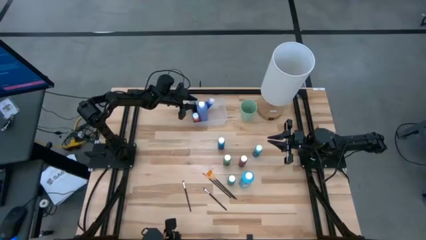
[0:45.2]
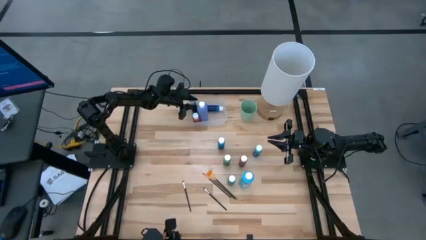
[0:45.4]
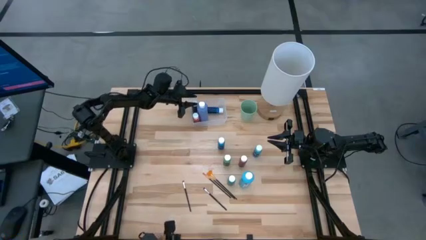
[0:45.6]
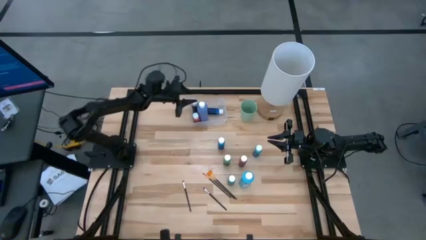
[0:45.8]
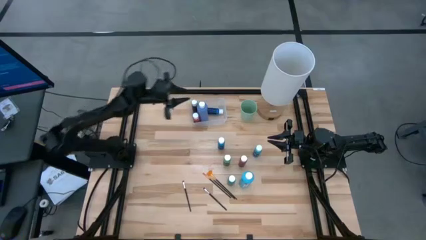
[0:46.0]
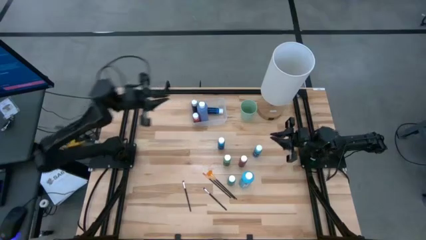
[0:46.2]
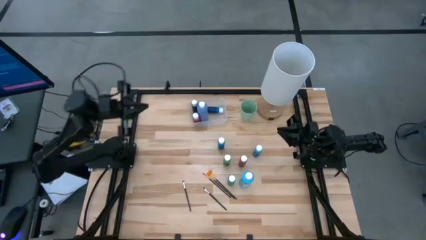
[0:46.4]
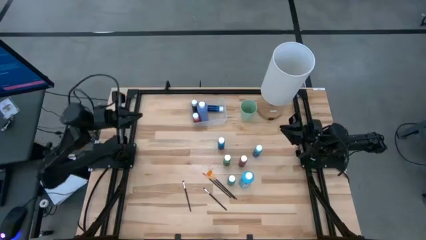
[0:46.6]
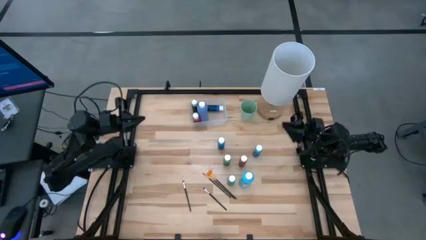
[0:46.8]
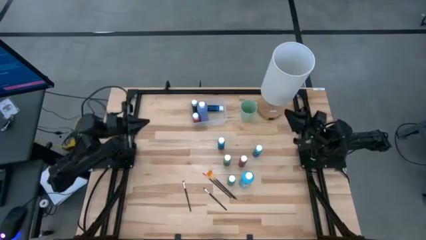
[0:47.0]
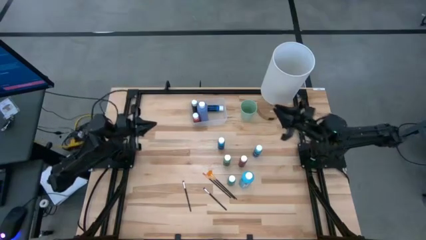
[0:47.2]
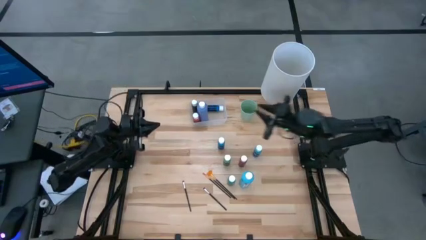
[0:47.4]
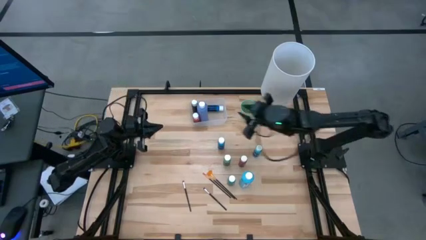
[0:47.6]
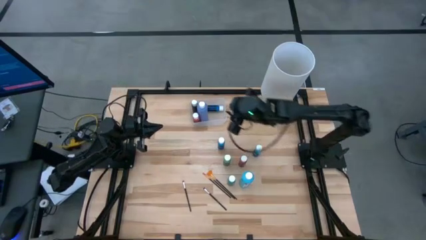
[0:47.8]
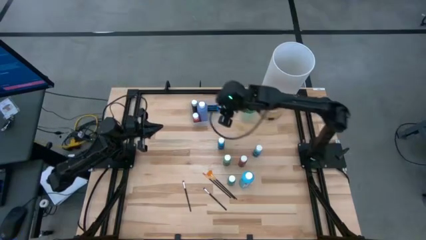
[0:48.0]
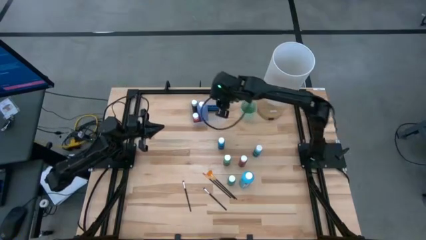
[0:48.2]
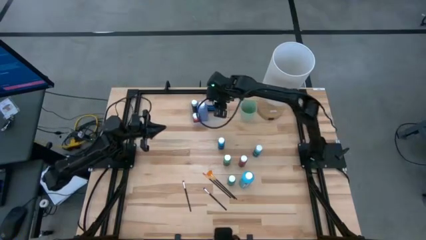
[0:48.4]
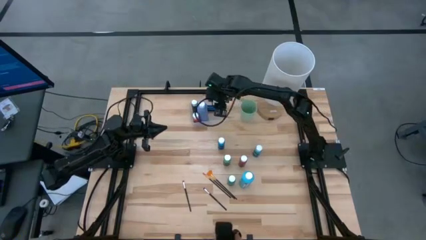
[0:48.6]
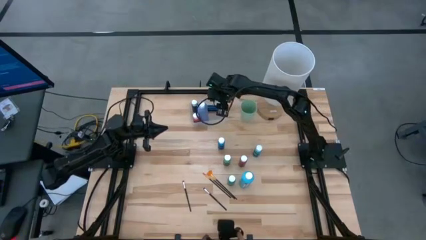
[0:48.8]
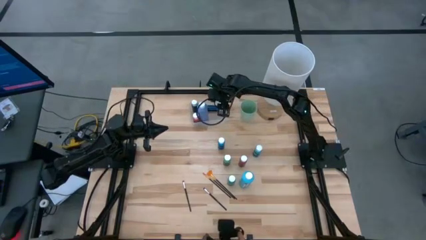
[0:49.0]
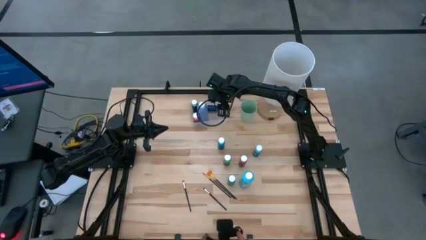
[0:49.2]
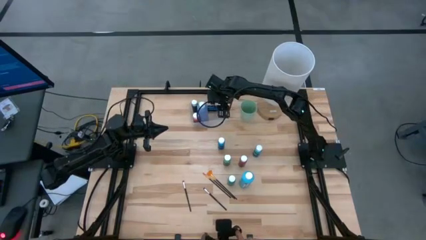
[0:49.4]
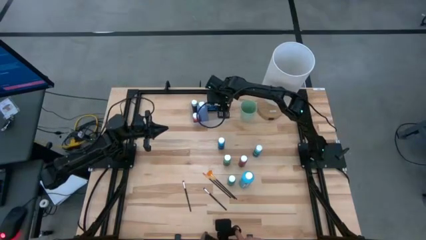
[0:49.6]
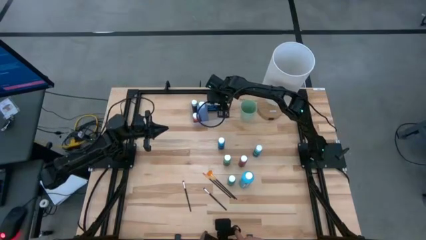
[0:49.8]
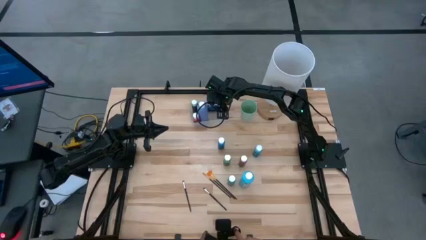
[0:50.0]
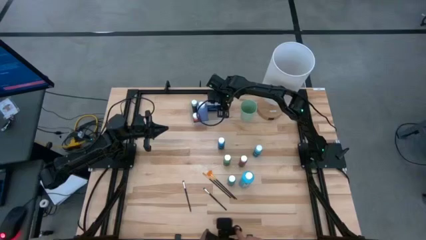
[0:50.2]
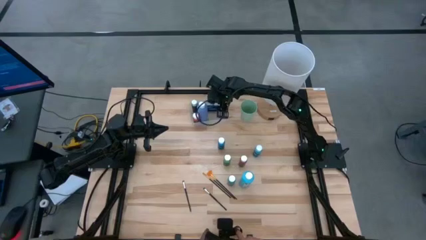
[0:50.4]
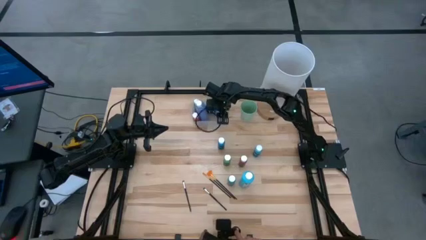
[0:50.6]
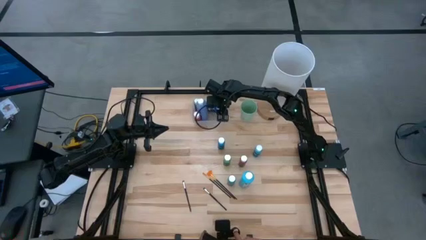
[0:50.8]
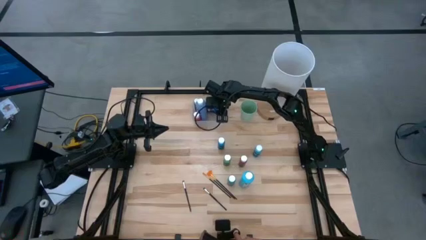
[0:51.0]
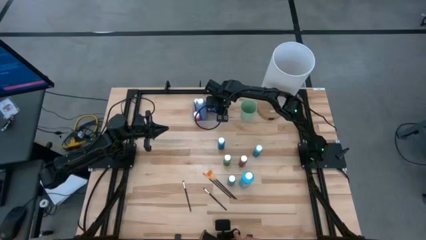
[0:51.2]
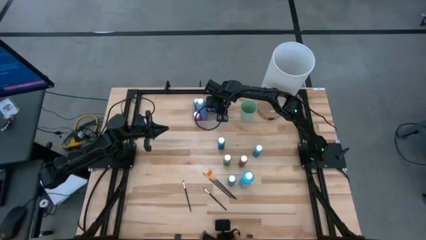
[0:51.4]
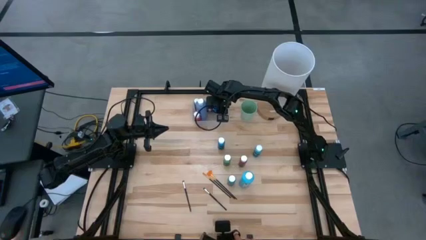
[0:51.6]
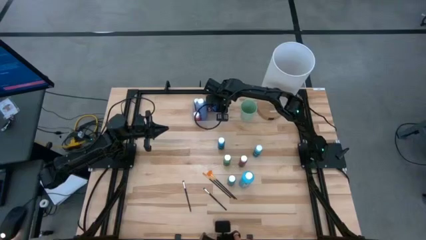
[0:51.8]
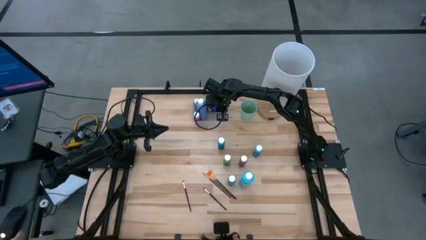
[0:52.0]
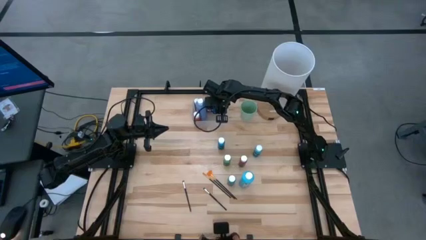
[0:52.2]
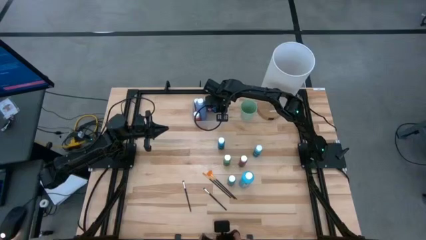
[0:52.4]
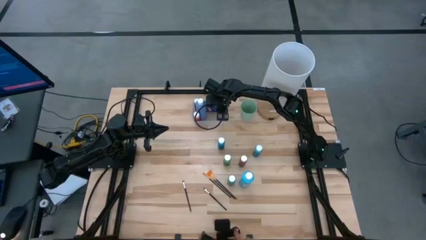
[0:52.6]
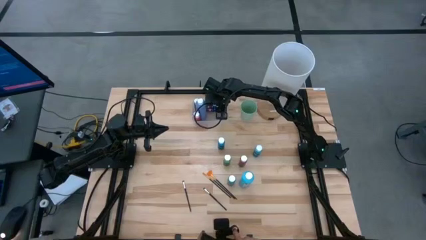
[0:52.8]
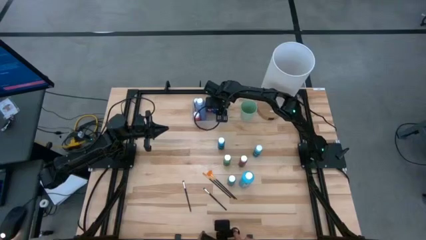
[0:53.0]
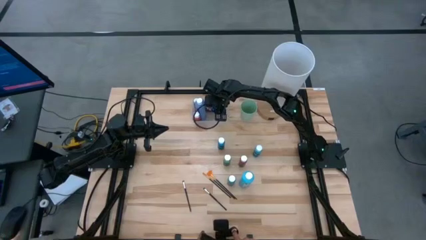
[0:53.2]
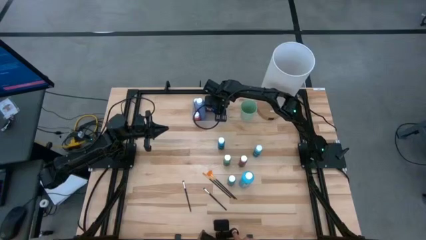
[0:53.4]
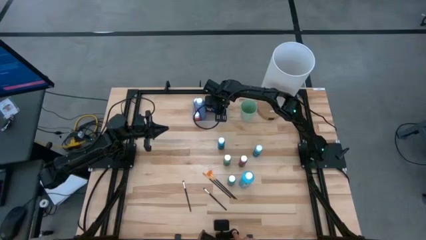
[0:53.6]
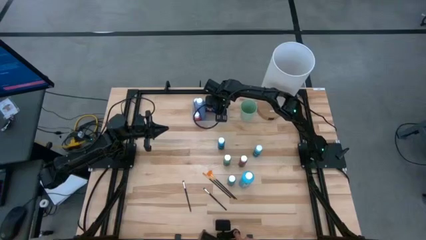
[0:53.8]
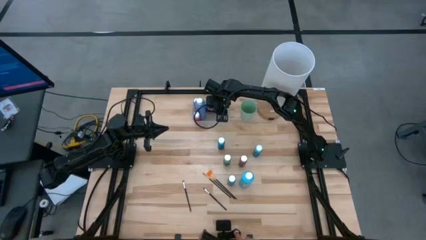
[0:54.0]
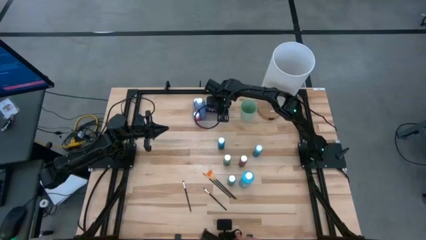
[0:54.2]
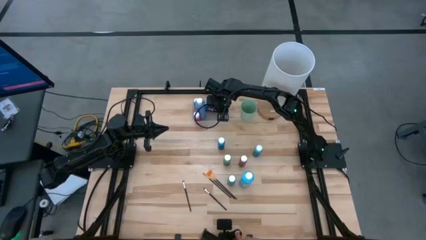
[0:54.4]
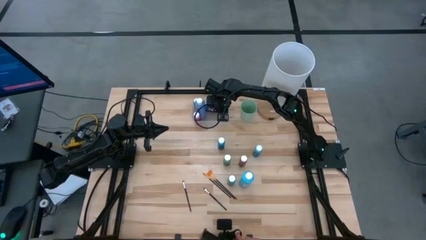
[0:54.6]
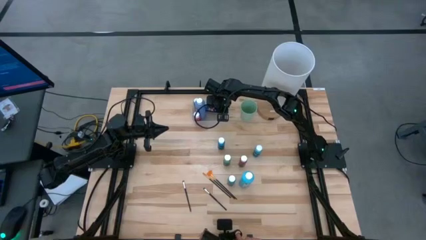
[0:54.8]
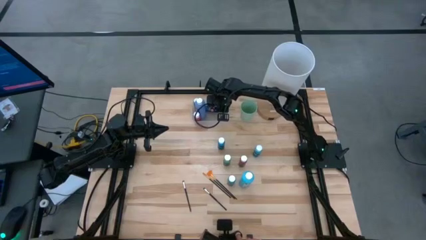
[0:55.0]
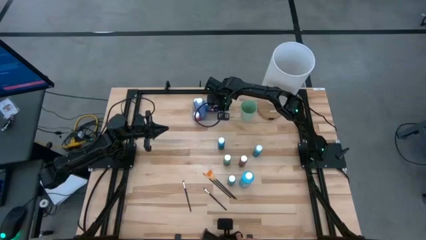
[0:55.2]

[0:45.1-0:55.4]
Task: Pick & Place Paint Supplies
Put the small bottom blue paint bottle into the transparent bin
